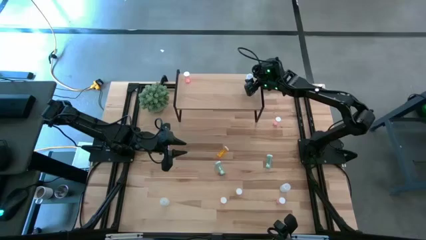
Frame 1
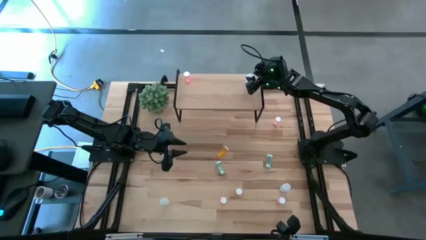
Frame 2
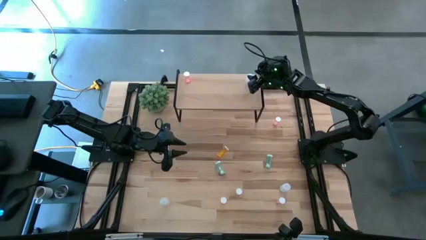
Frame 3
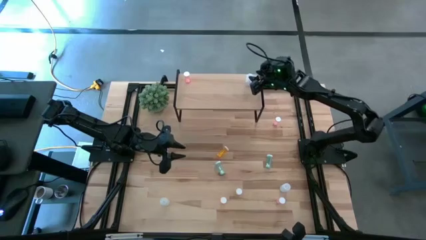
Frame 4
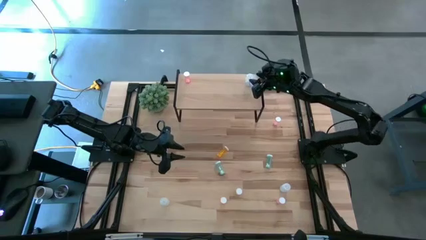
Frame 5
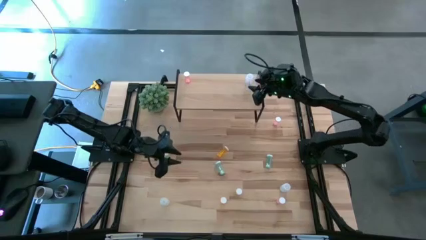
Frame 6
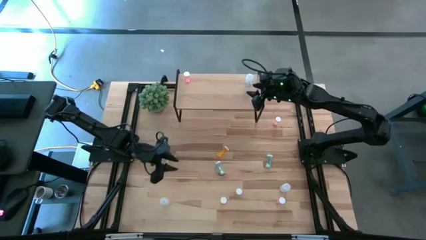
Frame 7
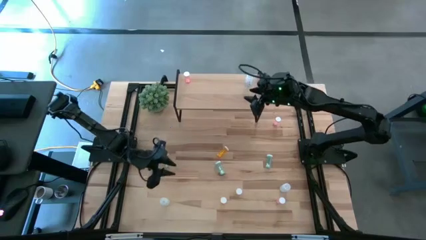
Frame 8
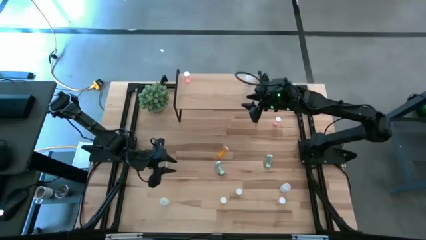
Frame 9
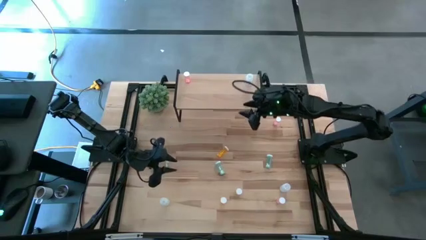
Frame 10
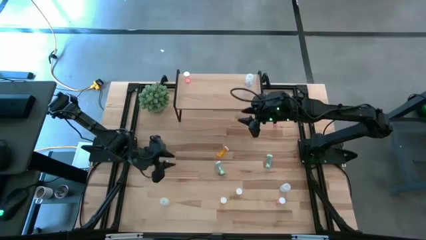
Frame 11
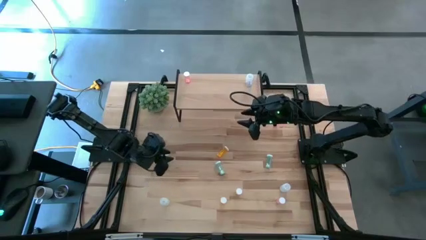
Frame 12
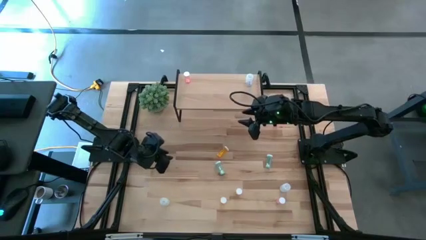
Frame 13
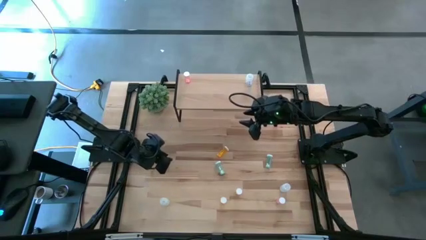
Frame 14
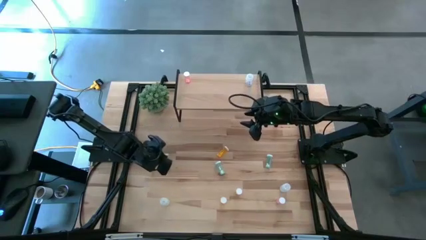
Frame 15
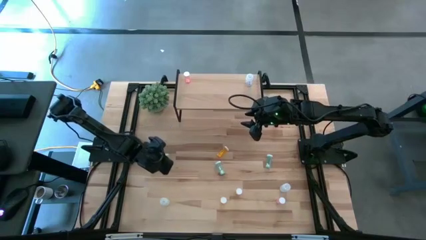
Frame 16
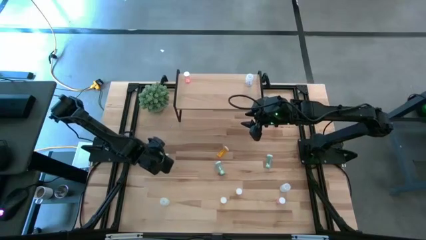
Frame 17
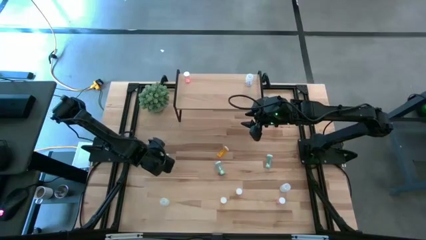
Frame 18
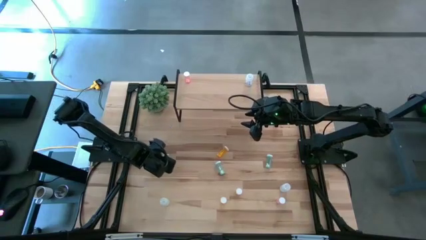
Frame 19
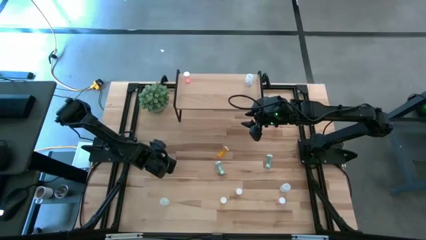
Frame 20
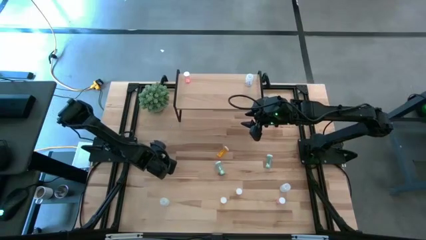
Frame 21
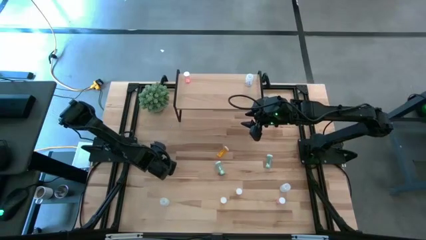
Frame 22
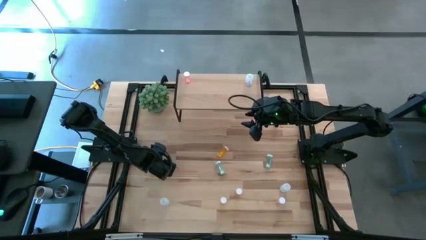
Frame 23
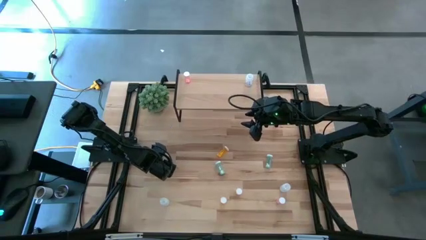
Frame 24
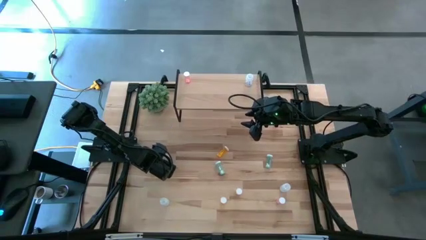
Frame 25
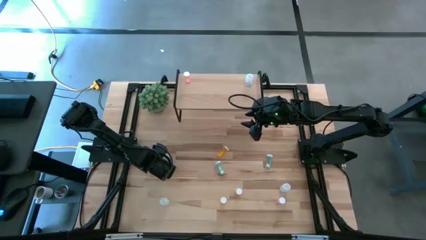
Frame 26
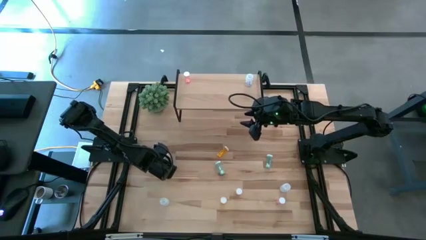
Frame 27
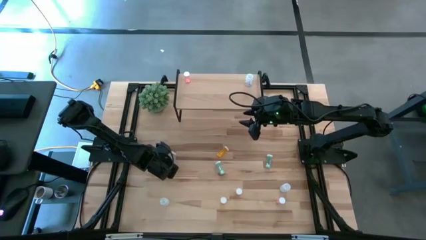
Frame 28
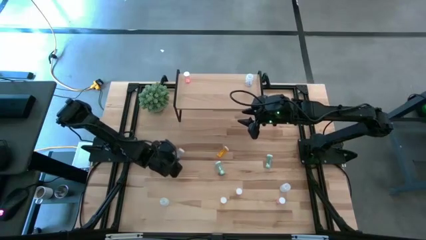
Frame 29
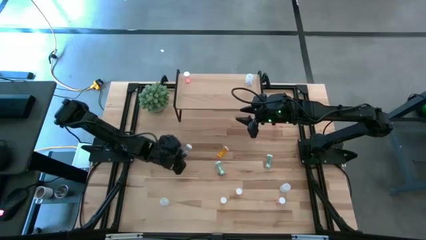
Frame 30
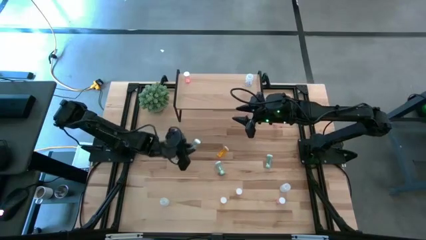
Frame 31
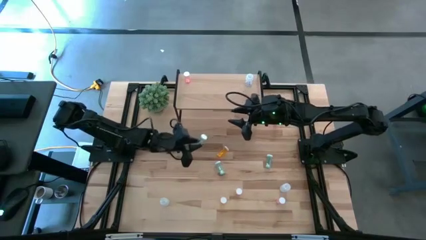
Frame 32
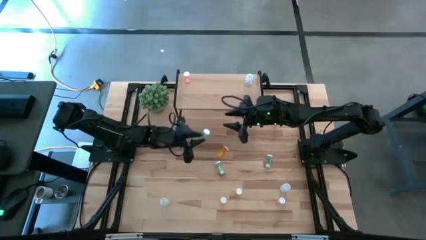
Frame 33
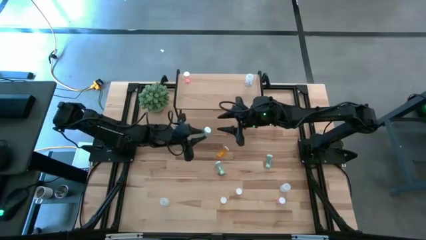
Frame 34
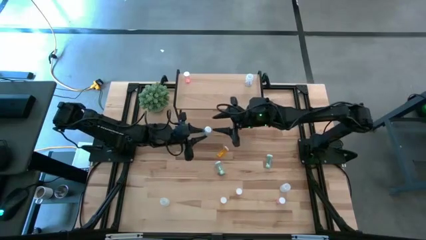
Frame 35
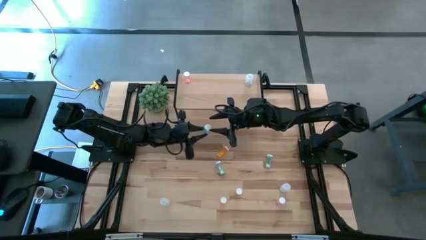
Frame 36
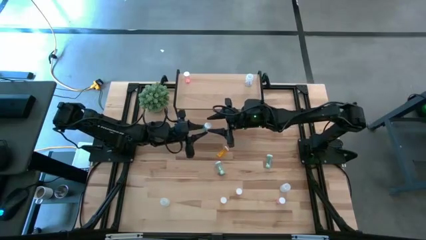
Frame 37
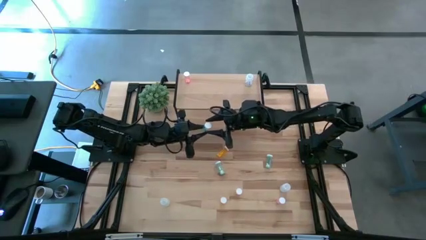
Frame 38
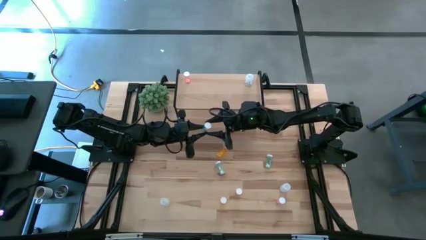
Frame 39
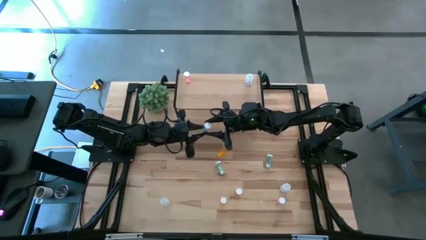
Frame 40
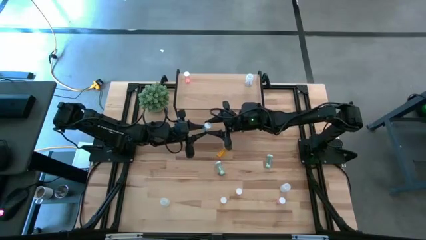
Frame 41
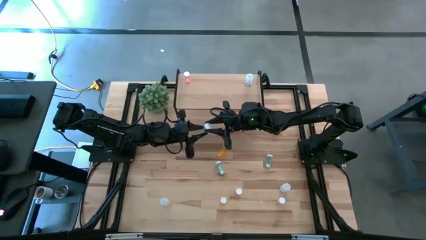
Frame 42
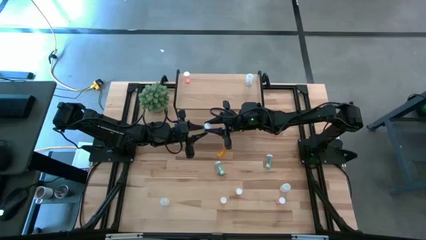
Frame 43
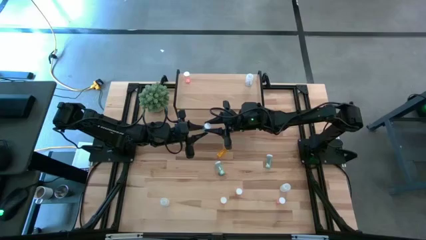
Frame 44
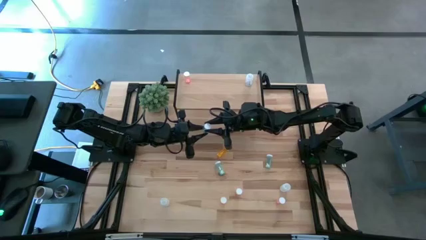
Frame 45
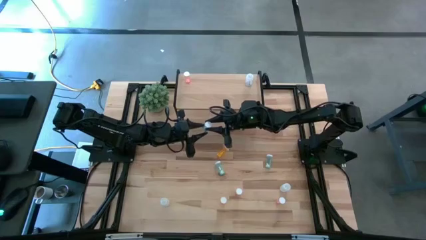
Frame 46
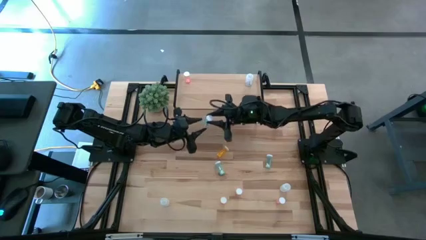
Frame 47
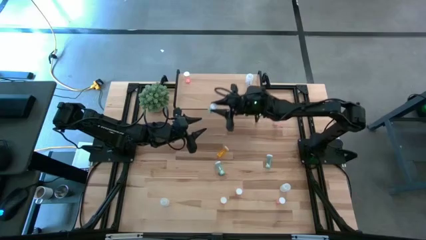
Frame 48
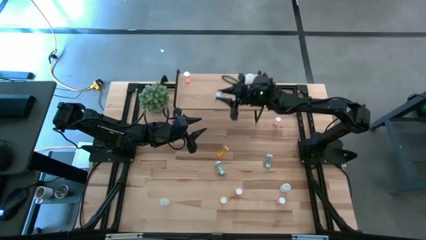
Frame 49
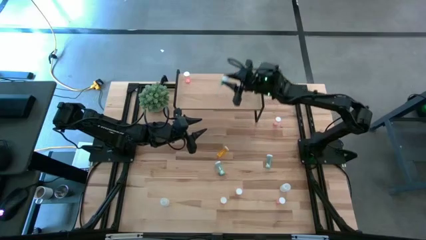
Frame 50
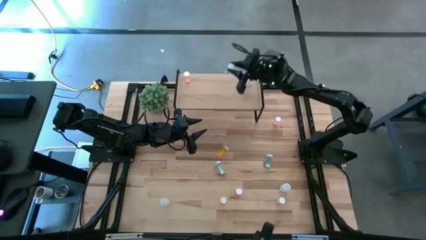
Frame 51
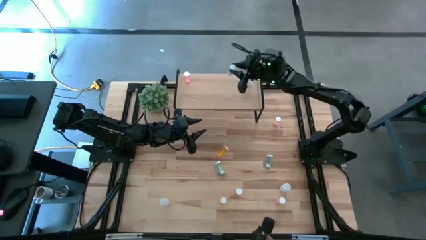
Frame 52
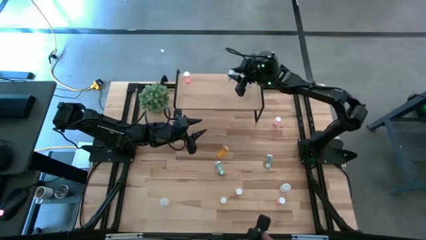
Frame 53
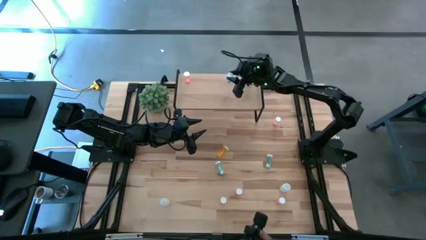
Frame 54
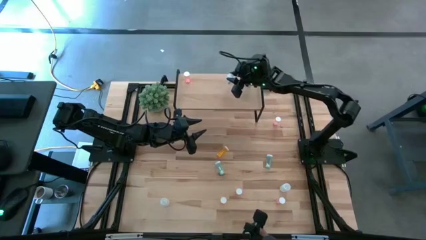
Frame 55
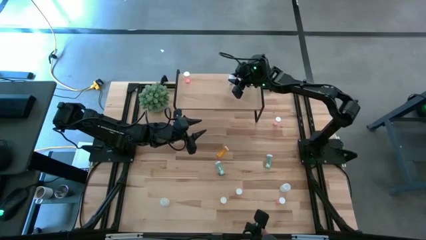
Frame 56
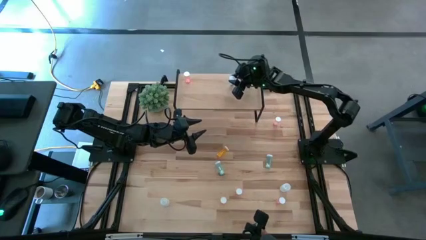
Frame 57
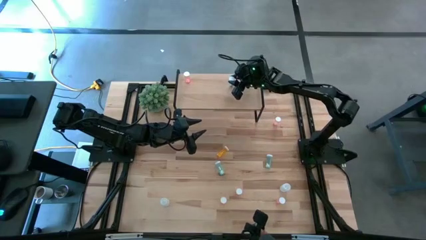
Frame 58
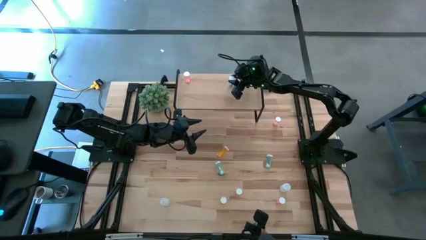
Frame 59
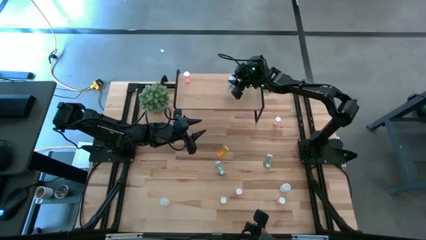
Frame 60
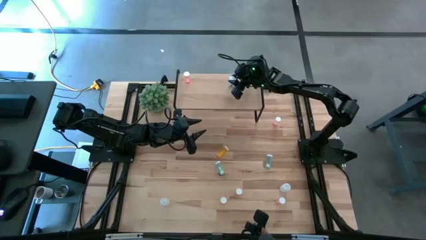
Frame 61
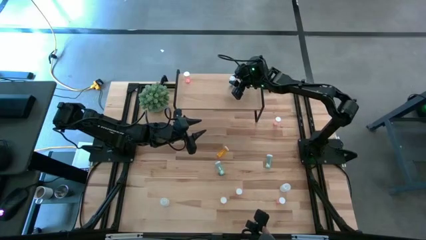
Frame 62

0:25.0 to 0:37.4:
Task: Pick and place medicine bottles onto shelf by color
Put the left blue pill bottle on the shelf

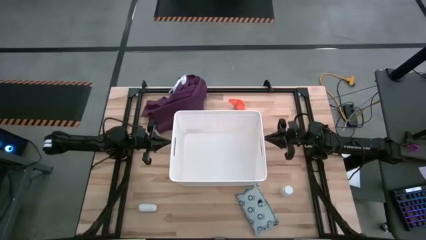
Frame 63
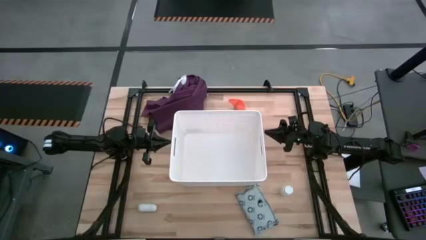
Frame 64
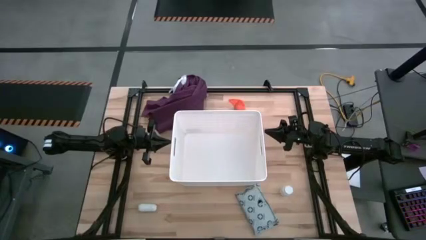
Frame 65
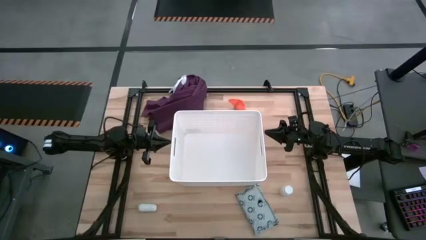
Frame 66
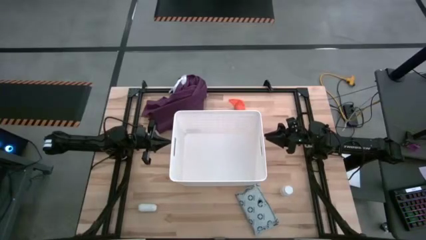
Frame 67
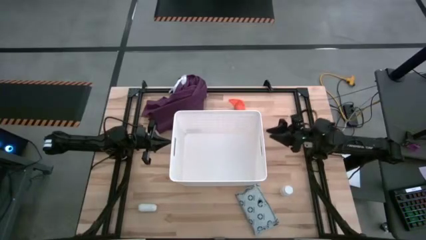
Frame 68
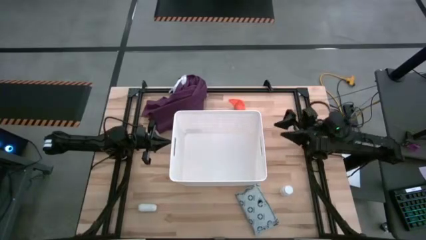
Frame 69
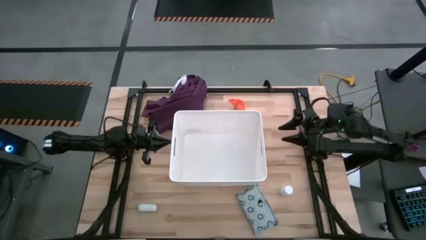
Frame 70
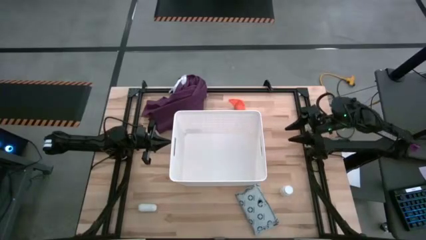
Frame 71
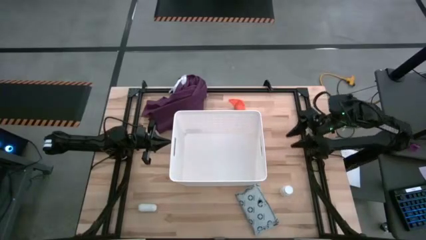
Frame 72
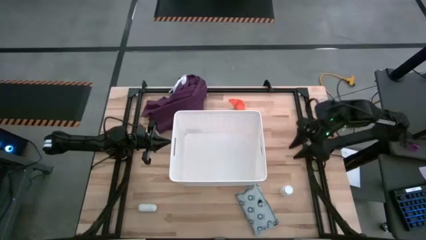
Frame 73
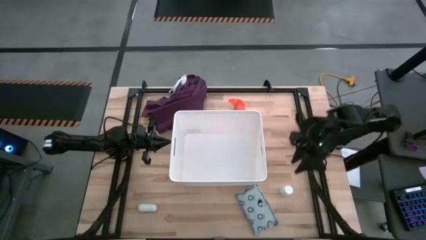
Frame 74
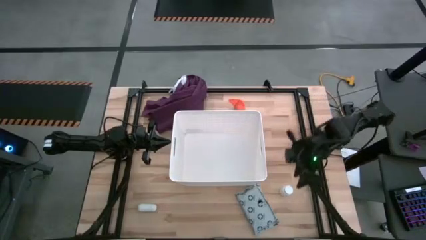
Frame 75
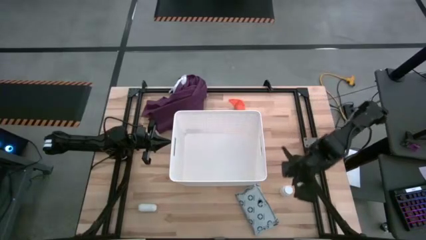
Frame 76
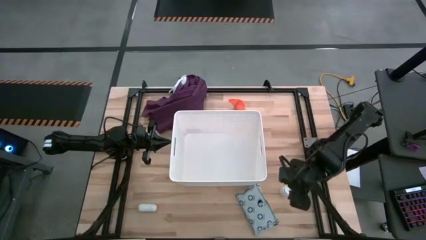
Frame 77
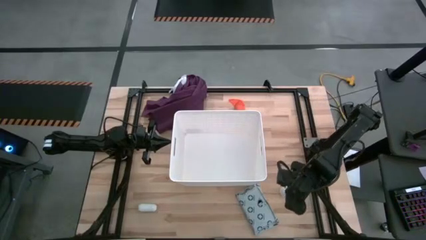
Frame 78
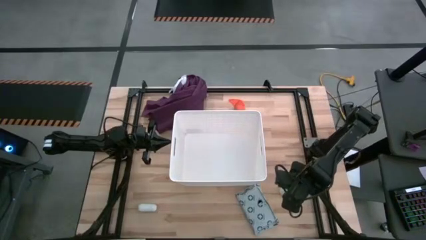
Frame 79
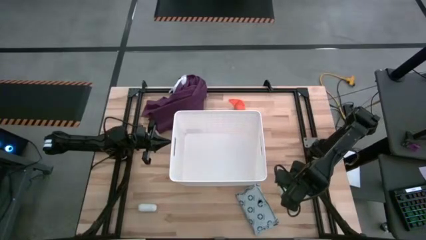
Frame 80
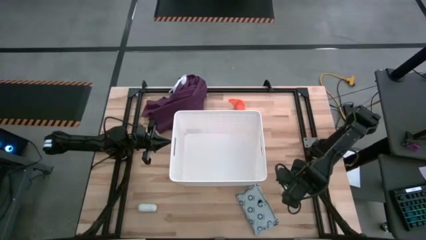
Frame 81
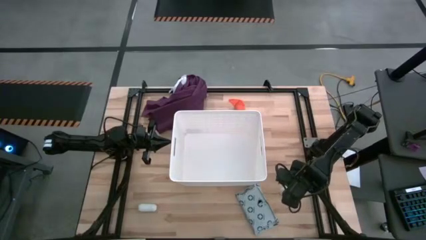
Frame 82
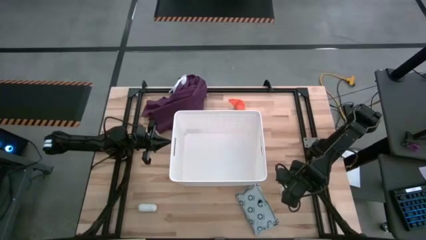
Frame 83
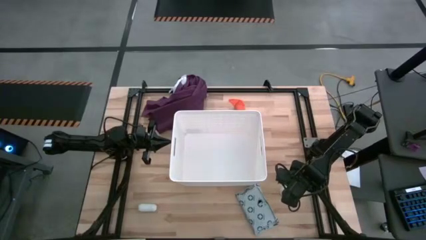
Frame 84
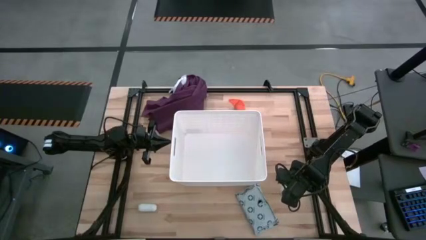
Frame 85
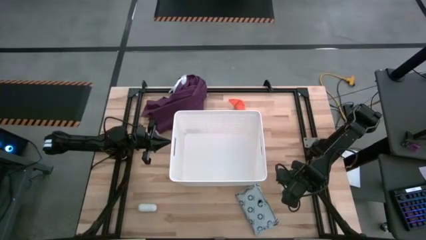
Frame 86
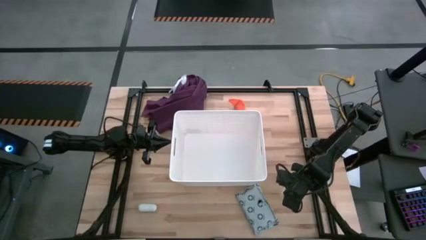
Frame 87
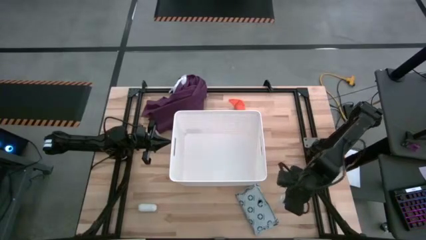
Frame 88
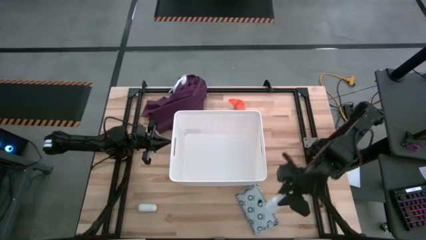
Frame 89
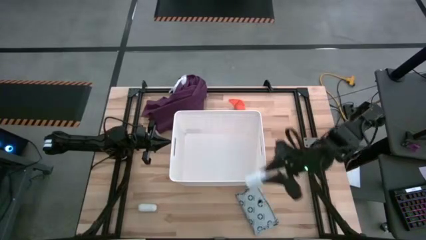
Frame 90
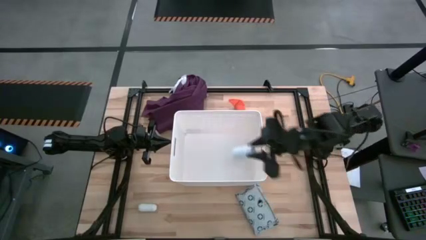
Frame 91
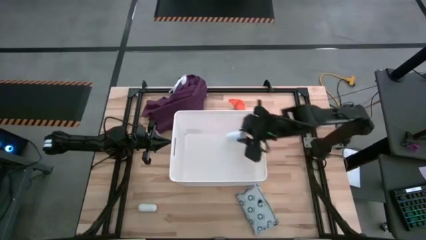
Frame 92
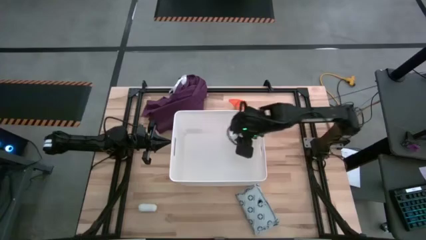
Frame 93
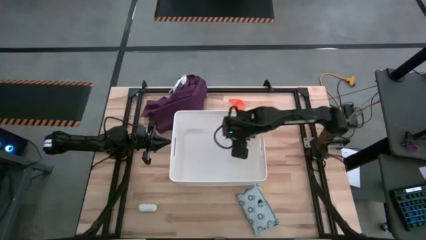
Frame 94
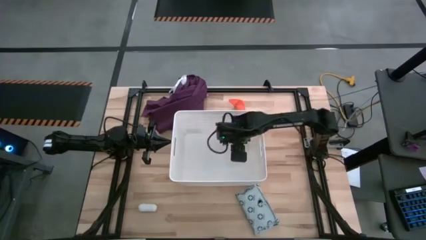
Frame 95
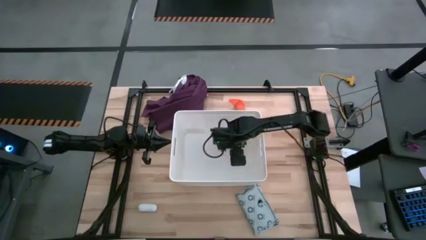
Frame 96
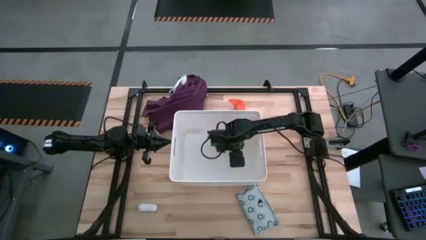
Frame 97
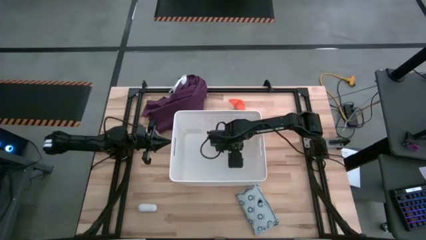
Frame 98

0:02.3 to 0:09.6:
Task: Pick & place medical supplies in basket/bin
Put the white pill bottle into the white bin
